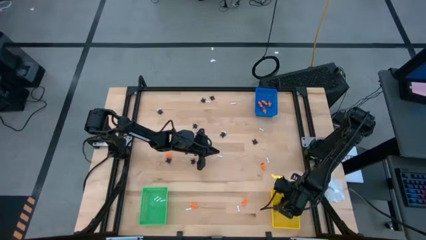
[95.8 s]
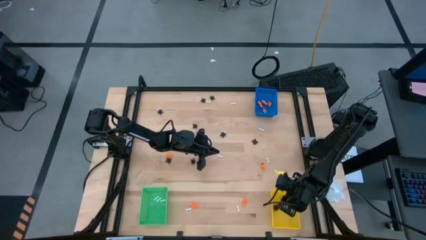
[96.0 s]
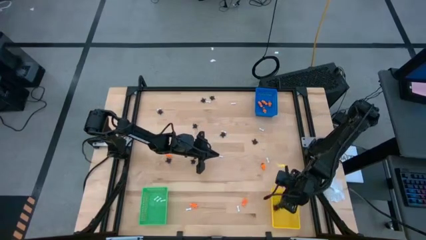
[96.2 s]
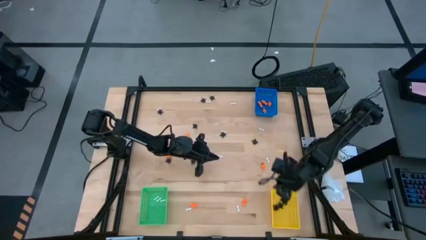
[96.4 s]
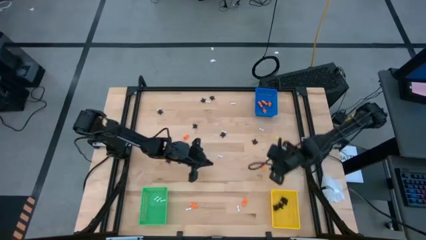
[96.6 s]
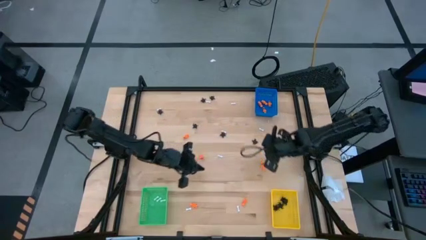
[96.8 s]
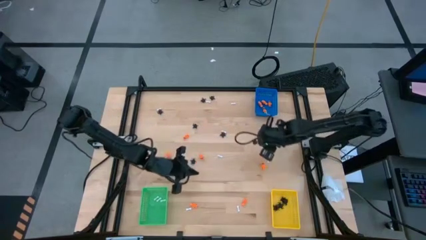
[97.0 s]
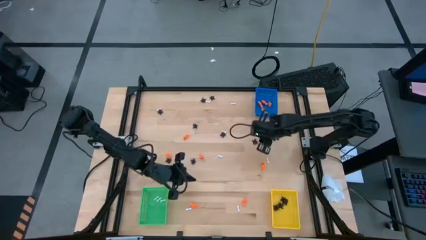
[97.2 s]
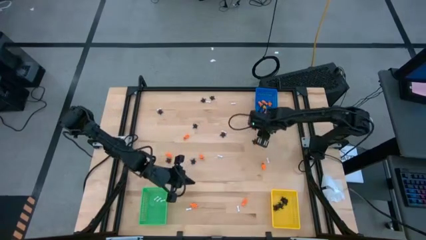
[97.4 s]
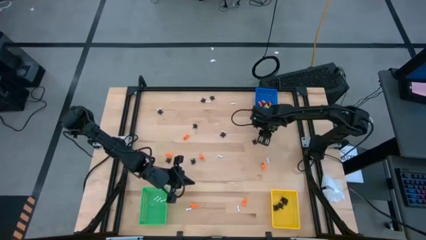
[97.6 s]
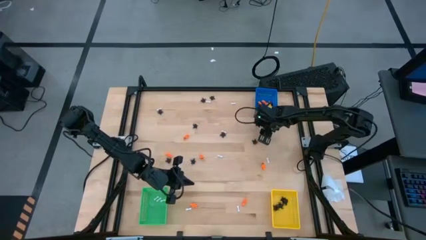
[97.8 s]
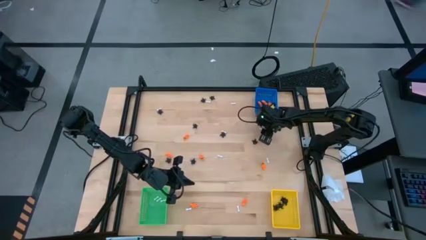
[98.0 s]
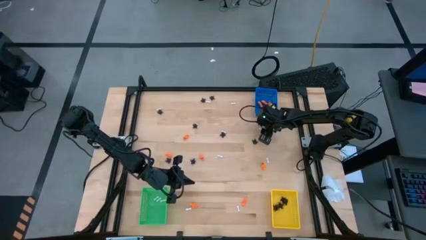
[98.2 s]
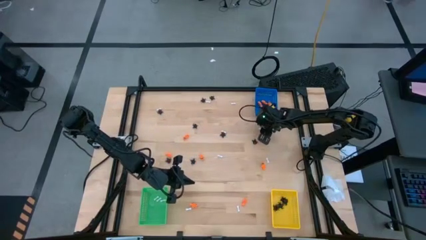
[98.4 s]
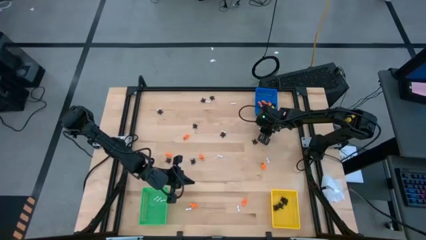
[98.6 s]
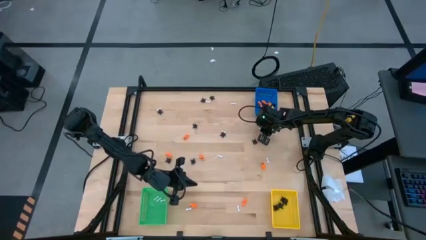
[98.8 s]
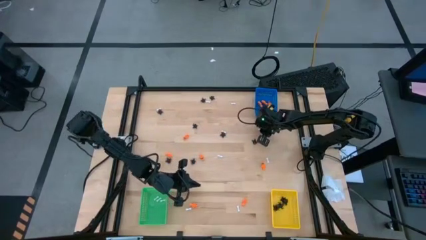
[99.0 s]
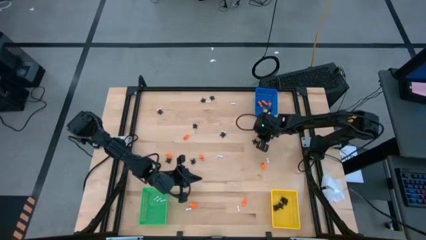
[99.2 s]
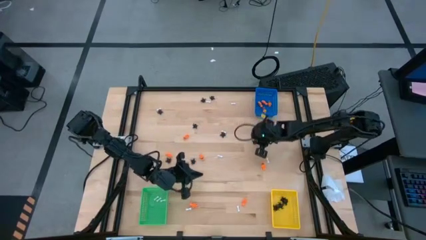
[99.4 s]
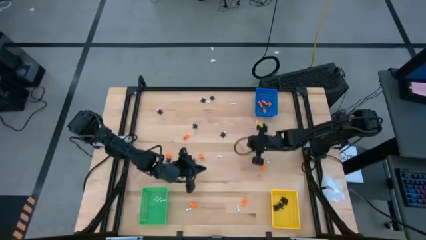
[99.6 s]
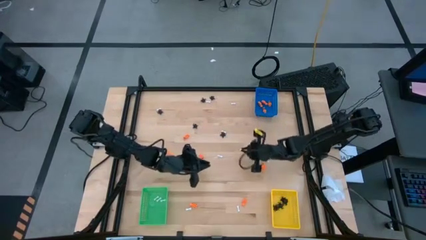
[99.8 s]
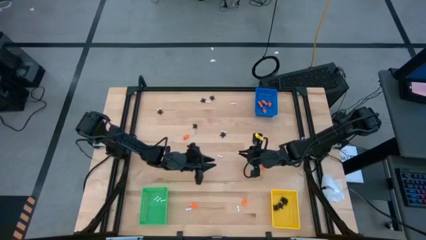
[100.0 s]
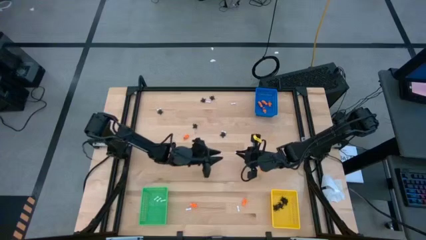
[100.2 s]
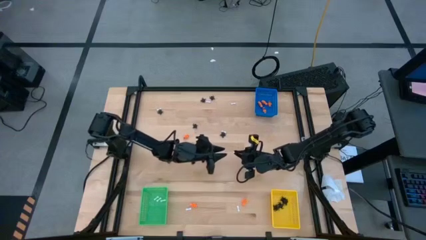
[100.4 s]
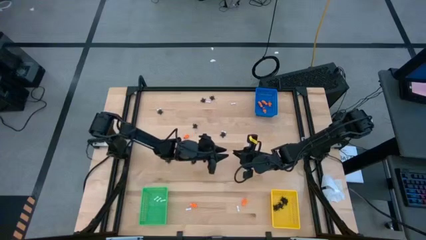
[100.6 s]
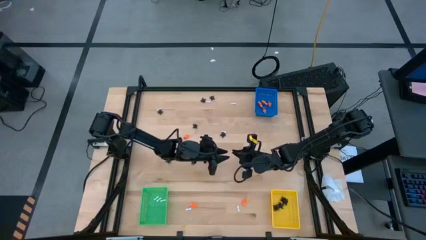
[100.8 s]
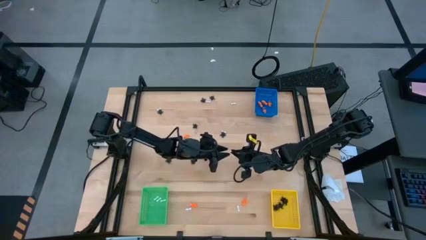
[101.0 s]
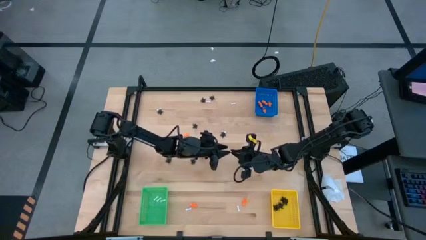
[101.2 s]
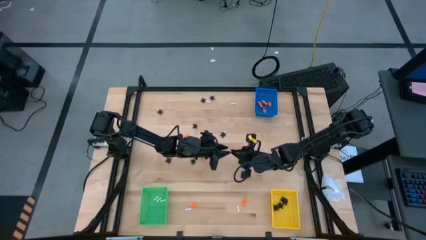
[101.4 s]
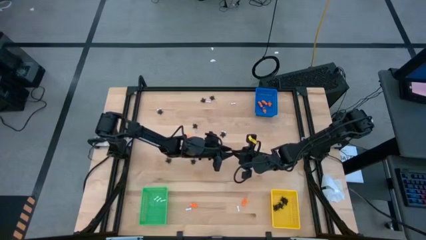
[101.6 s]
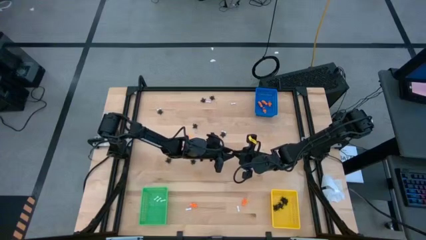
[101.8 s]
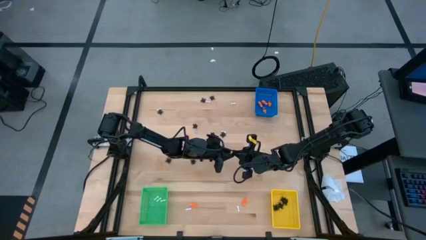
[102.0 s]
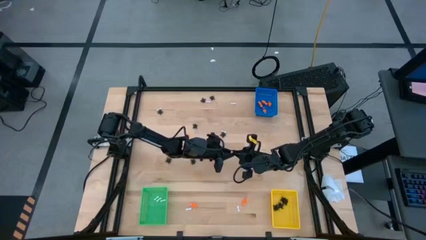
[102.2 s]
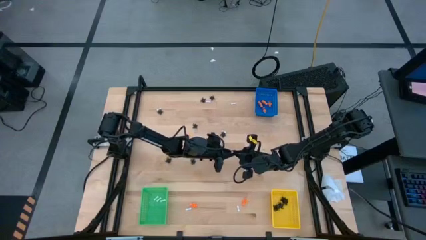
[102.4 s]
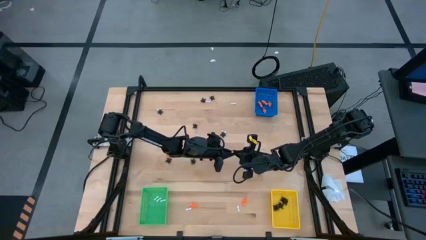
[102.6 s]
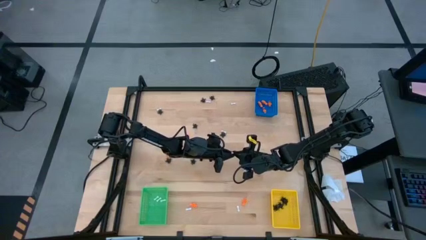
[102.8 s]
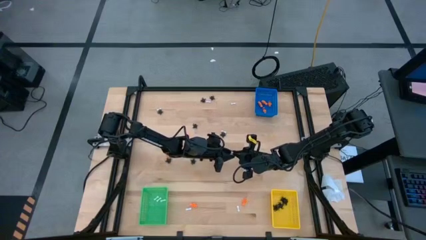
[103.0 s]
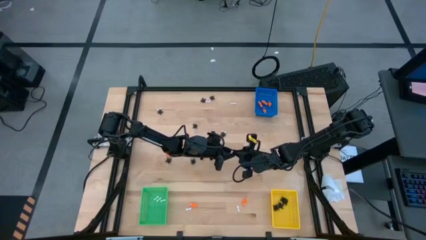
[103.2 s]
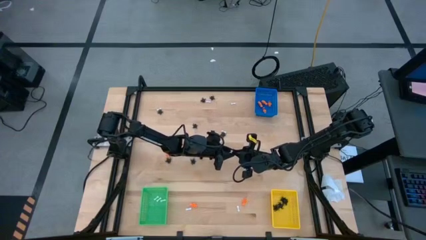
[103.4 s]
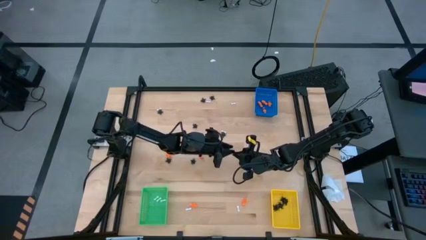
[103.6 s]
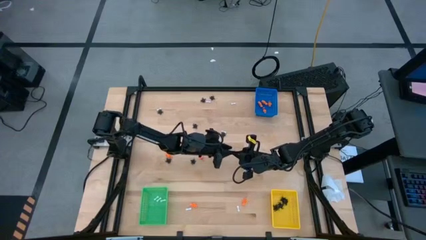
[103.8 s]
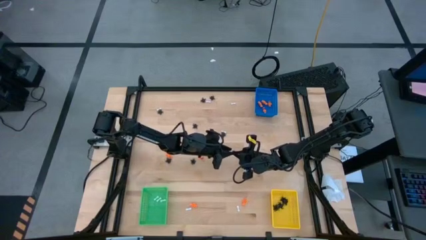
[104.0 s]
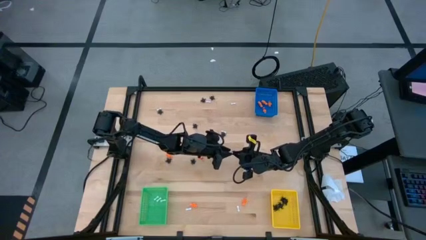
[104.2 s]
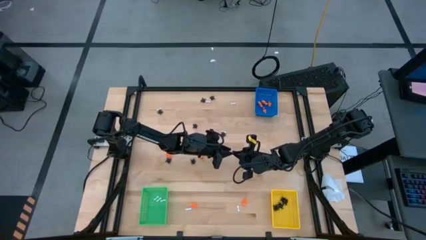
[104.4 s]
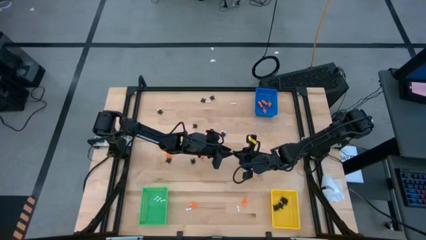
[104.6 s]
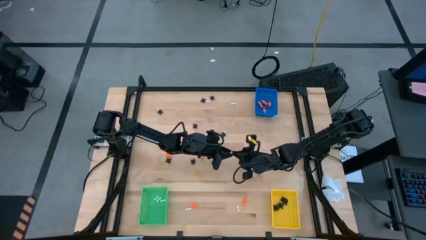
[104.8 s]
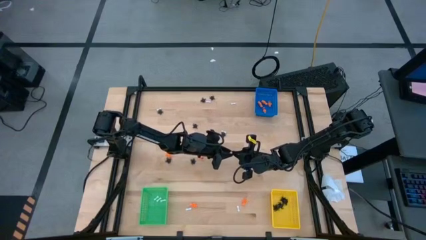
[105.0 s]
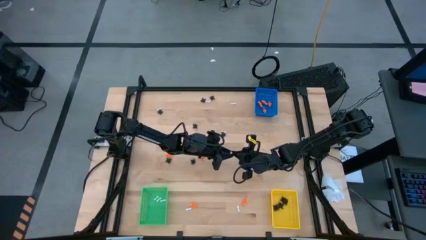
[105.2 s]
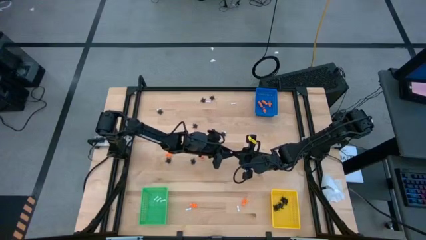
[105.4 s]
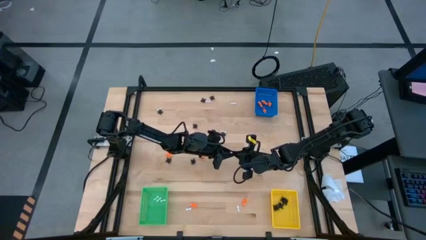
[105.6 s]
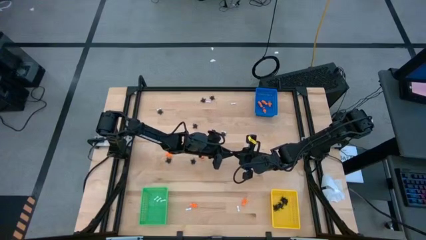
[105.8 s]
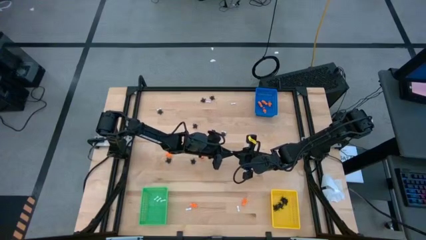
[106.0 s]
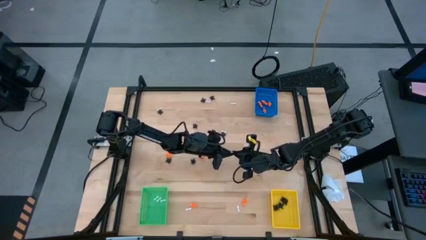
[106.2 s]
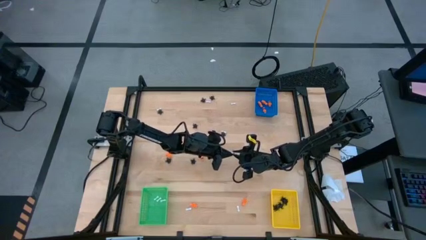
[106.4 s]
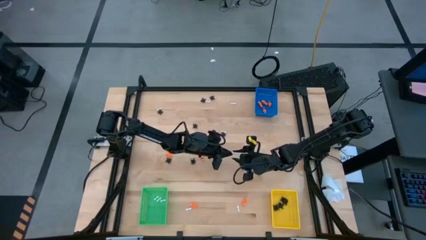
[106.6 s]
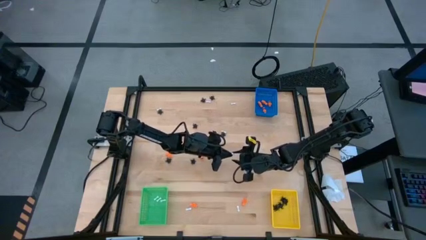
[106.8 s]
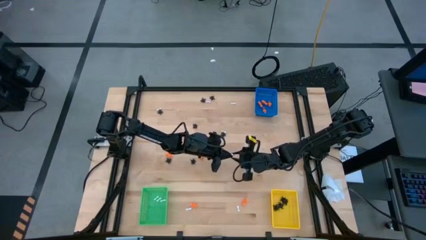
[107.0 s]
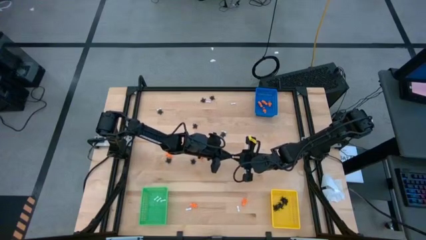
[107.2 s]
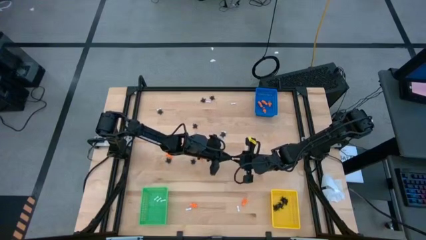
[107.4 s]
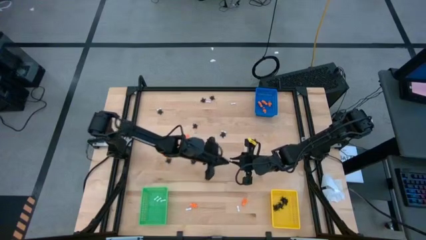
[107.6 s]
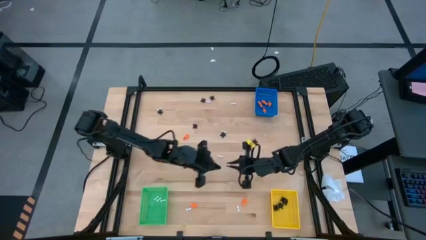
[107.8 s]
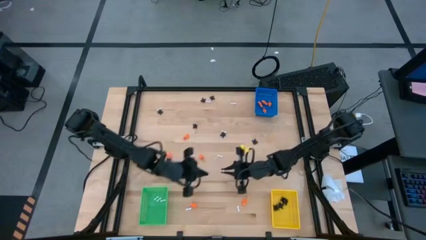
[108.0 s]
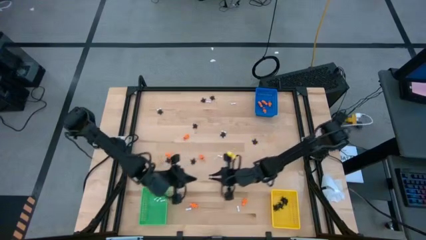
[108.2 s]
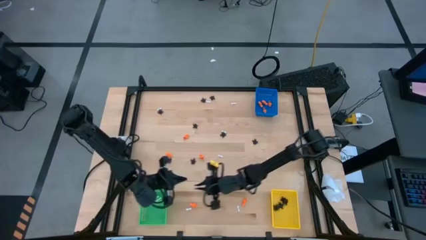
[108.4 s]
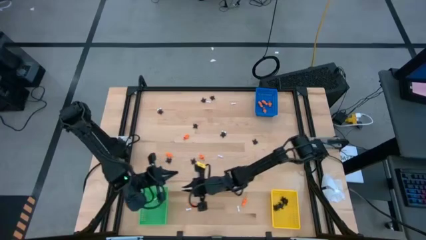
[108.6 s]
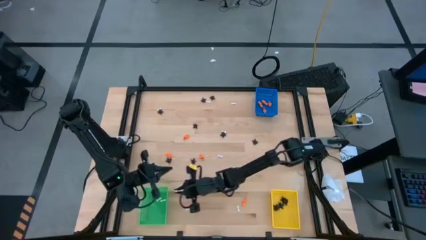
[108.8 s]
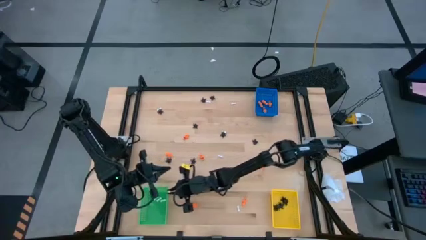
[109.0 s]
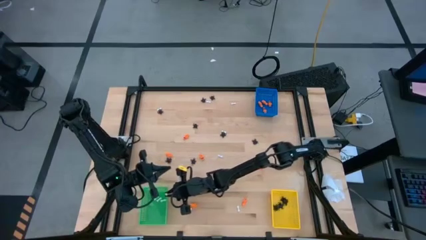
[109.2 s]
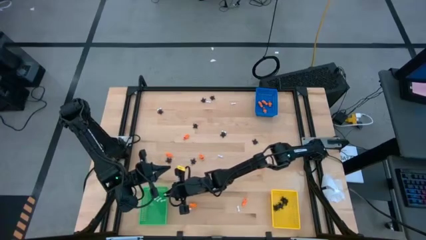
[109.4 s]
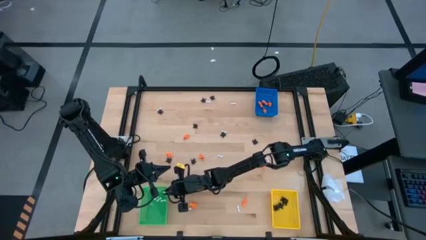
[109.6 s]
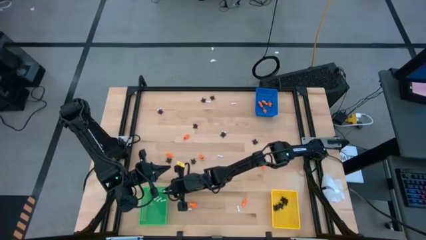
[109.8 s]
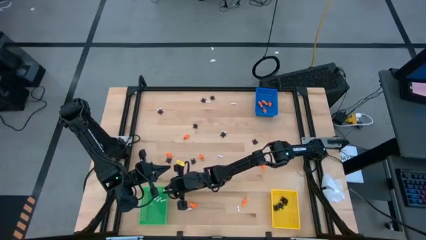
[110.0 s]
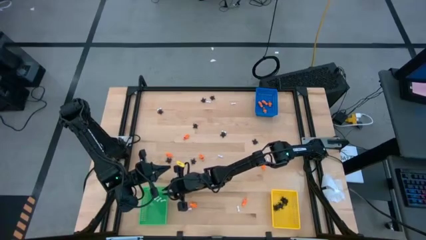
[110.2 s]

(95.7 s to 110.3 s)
Task: Sort Halloween decoration
Put the white bone toy into the green bin

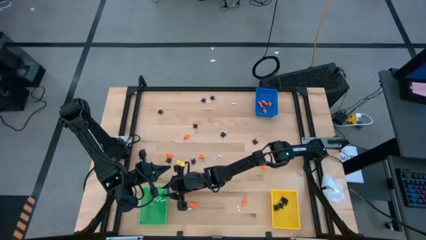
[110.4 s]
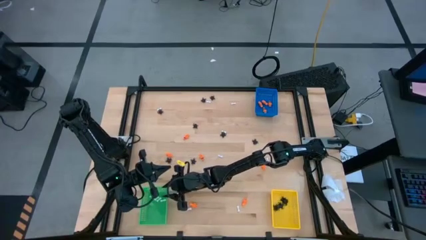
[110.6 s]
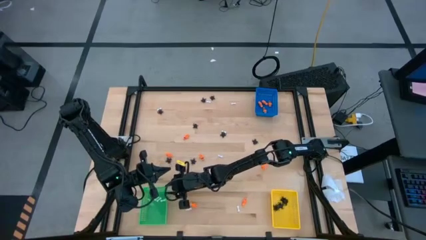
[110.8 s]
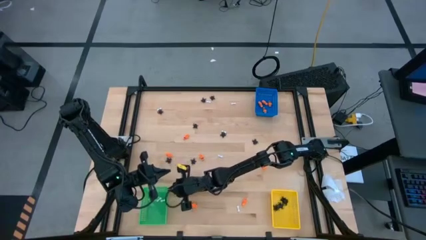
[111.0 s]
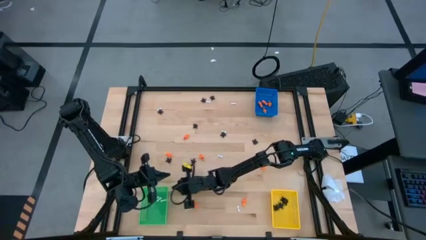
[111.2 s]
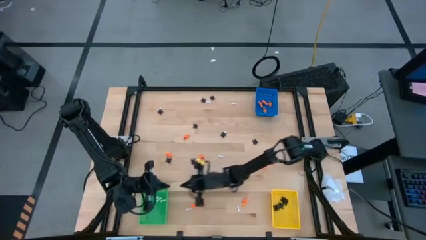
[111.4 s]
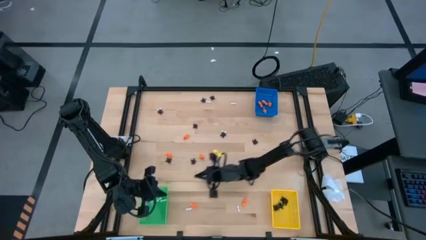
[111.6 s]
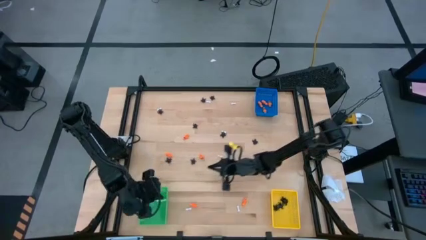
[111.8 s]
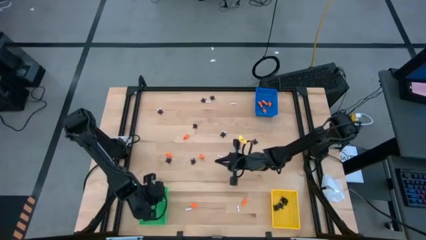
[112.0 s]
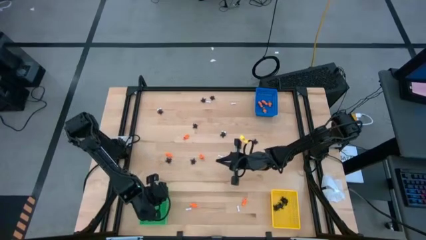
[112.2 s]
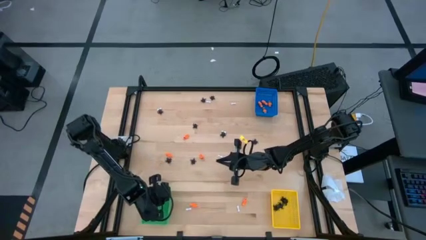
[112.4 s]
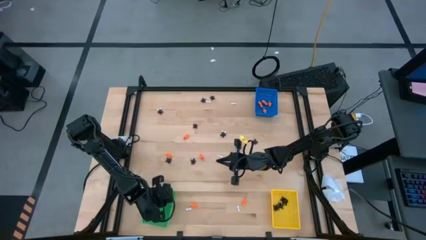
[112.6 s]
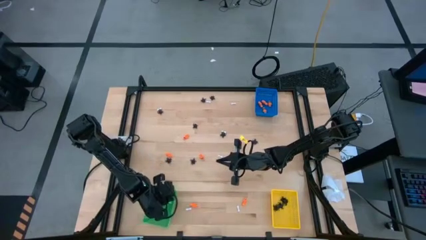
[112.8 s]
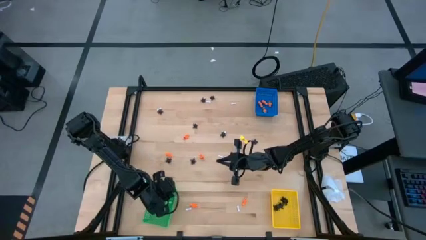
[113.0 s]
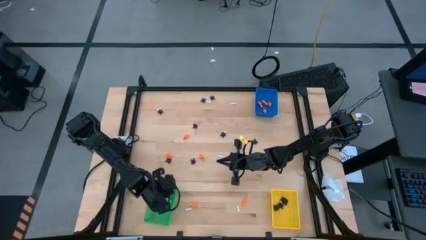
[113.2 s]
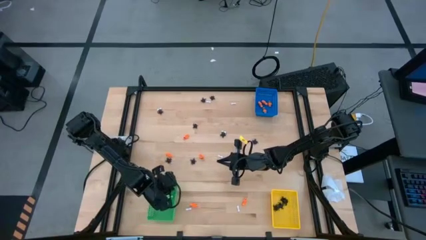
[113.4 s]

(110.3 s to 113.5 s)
Put the orange toy skeleton into the blue bin
